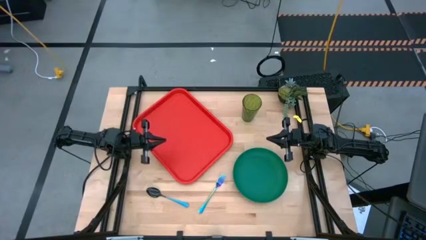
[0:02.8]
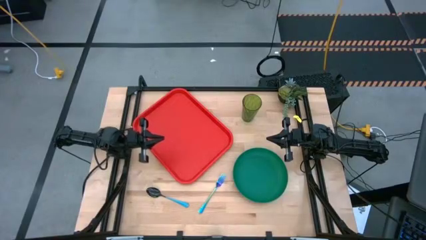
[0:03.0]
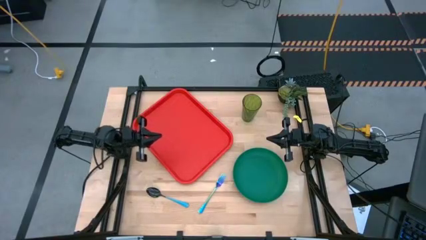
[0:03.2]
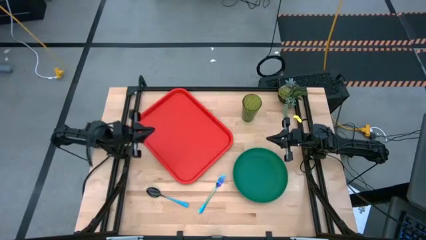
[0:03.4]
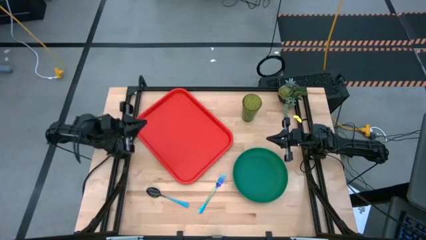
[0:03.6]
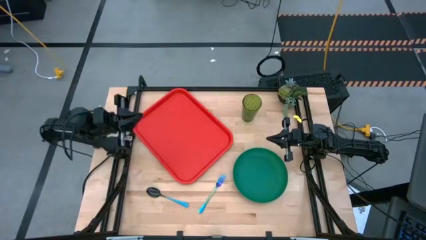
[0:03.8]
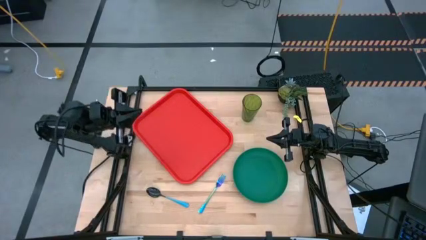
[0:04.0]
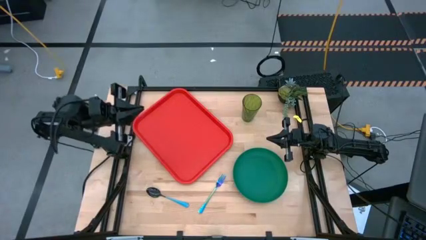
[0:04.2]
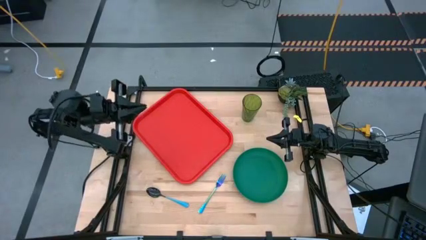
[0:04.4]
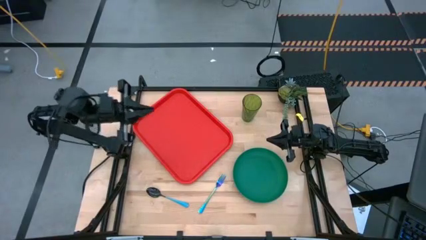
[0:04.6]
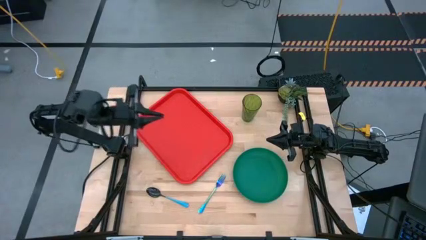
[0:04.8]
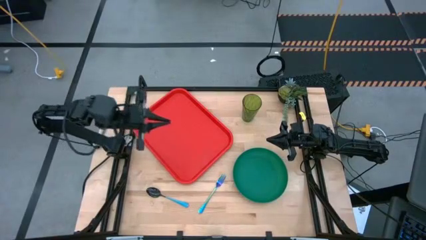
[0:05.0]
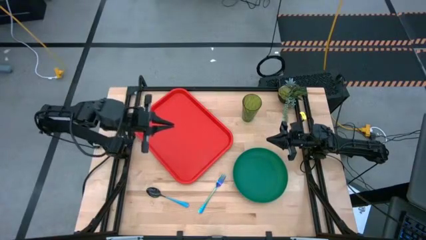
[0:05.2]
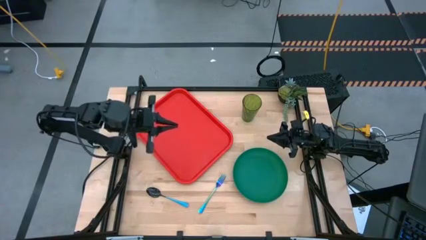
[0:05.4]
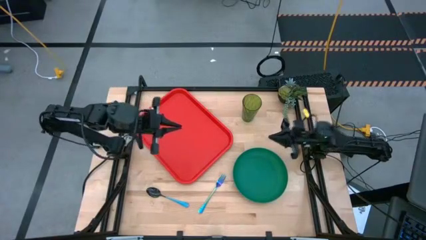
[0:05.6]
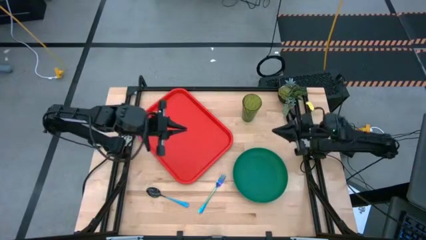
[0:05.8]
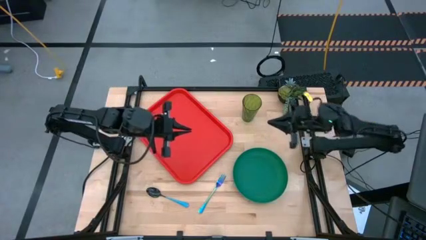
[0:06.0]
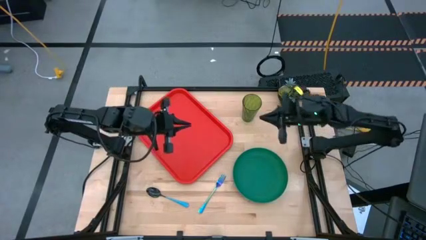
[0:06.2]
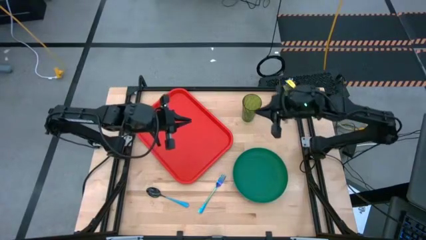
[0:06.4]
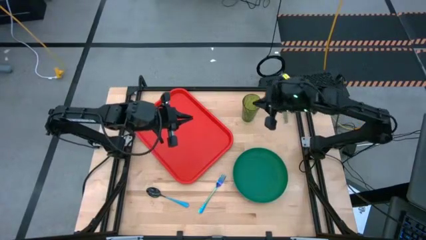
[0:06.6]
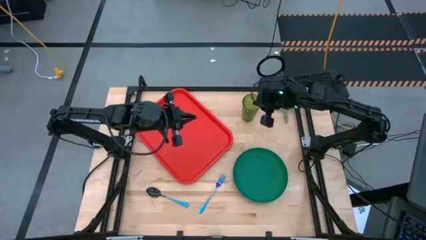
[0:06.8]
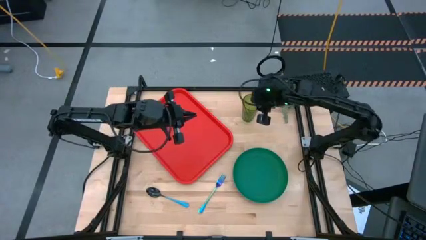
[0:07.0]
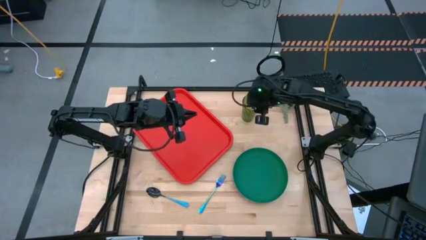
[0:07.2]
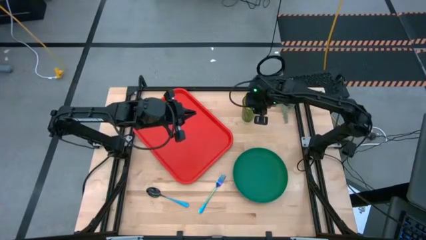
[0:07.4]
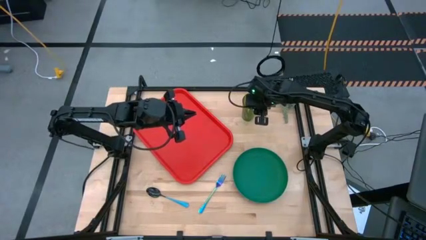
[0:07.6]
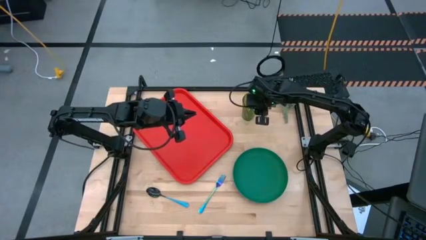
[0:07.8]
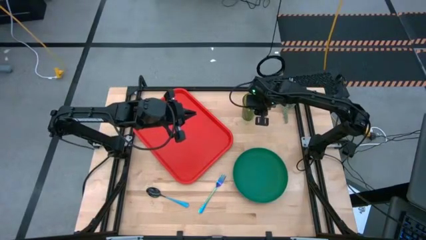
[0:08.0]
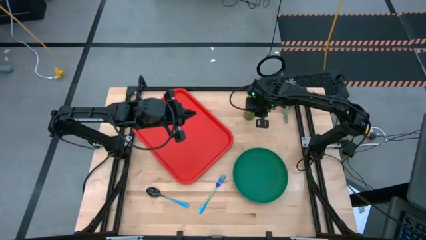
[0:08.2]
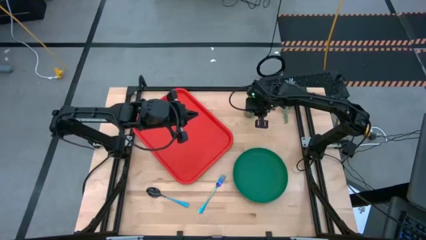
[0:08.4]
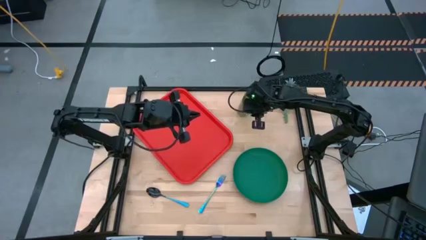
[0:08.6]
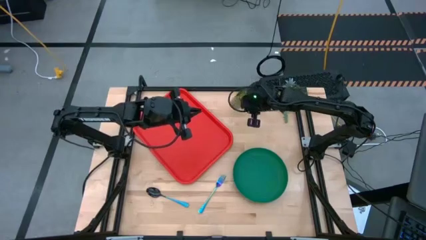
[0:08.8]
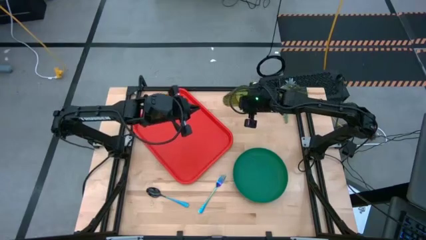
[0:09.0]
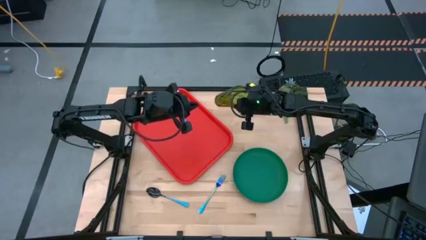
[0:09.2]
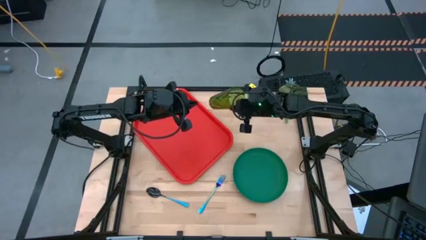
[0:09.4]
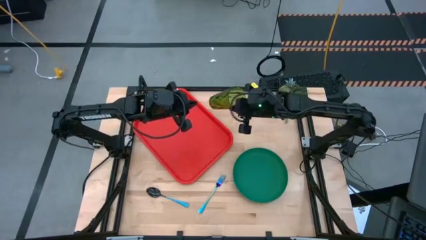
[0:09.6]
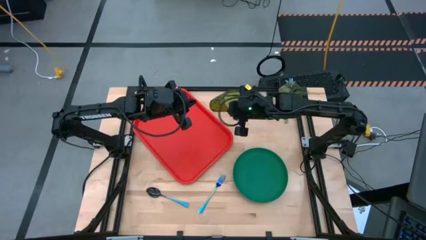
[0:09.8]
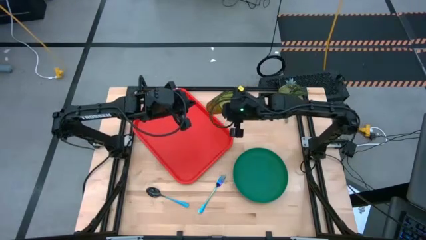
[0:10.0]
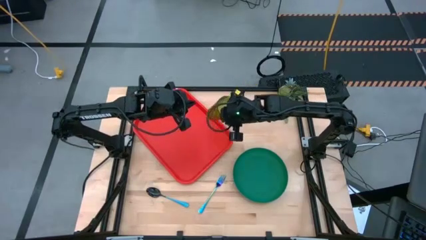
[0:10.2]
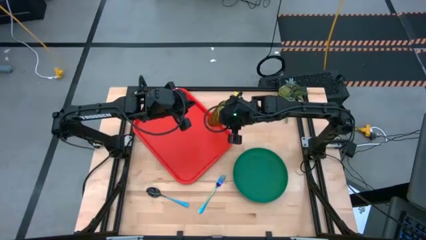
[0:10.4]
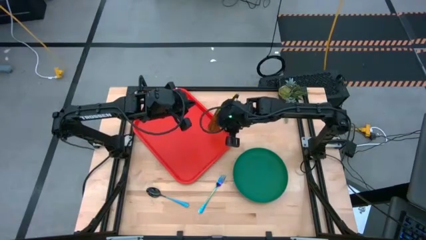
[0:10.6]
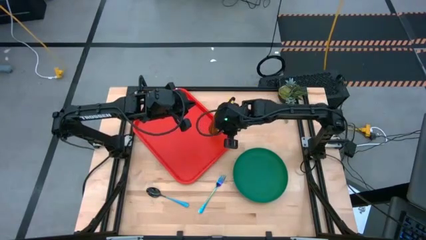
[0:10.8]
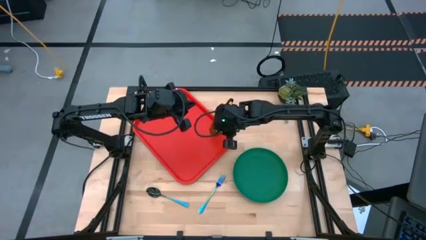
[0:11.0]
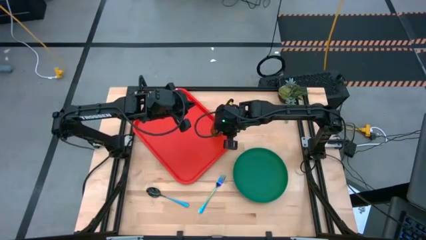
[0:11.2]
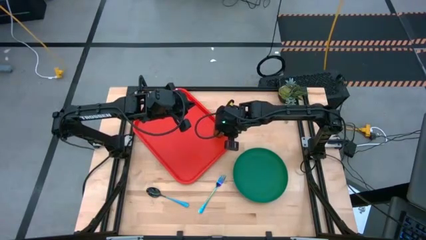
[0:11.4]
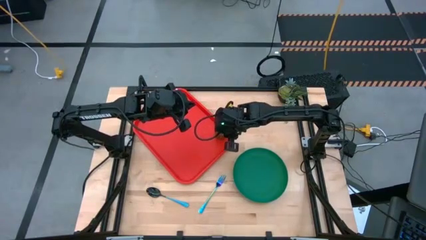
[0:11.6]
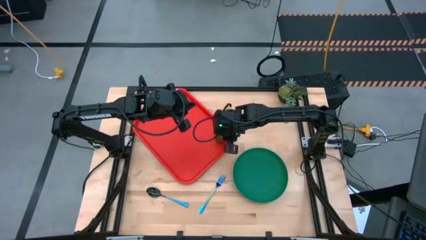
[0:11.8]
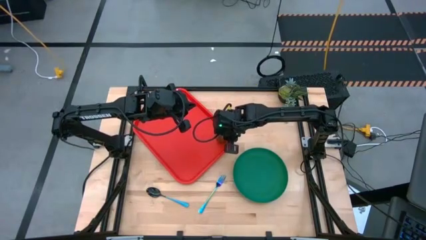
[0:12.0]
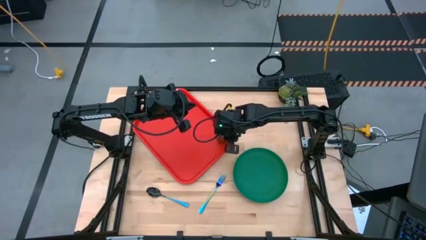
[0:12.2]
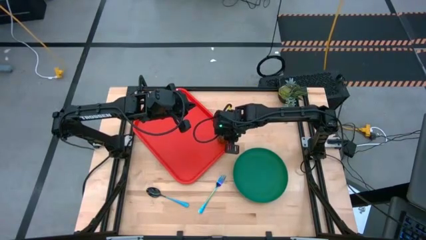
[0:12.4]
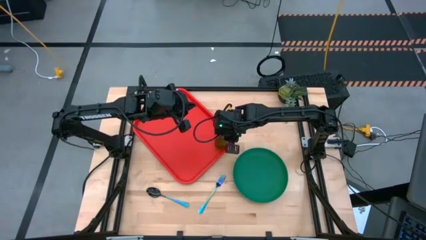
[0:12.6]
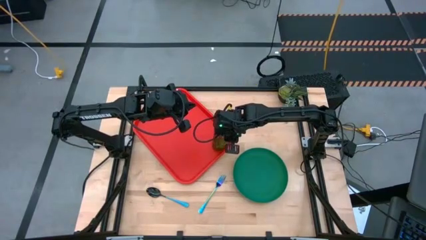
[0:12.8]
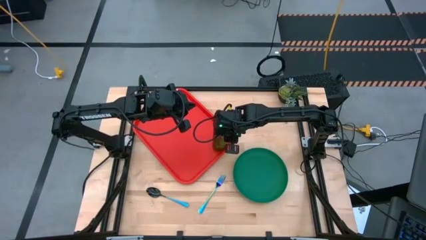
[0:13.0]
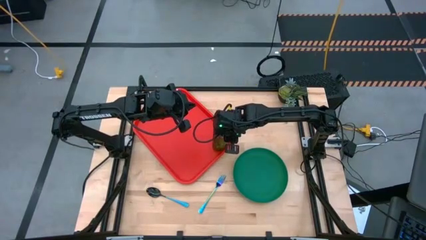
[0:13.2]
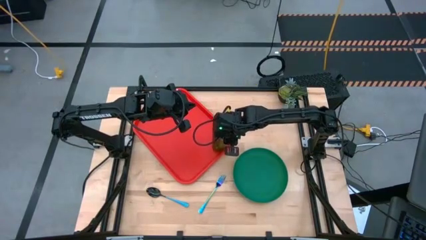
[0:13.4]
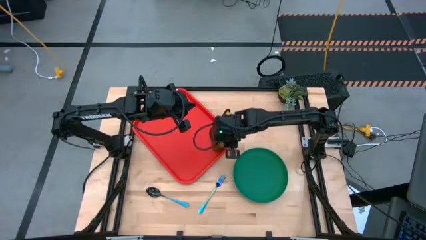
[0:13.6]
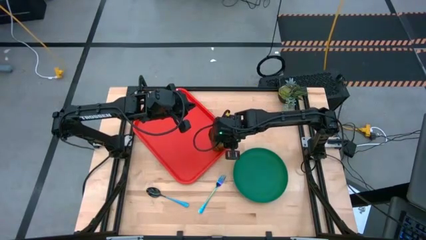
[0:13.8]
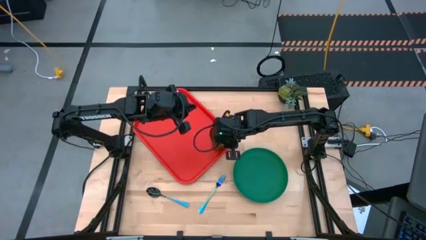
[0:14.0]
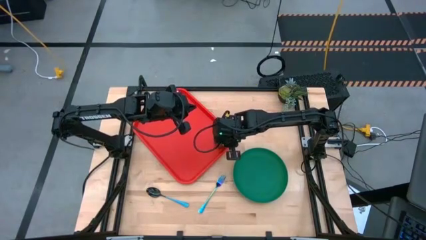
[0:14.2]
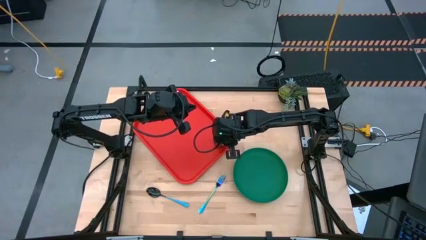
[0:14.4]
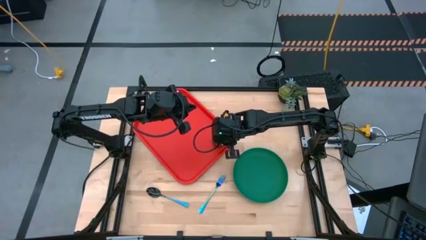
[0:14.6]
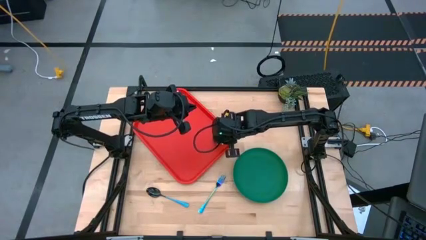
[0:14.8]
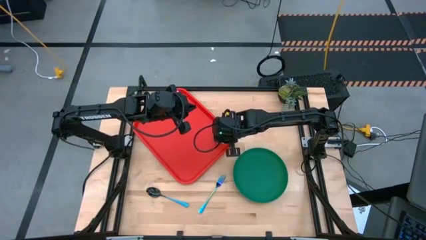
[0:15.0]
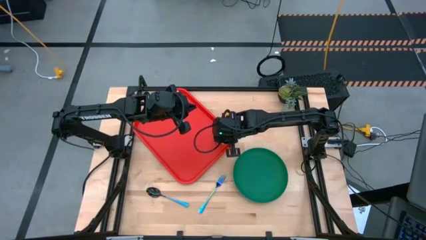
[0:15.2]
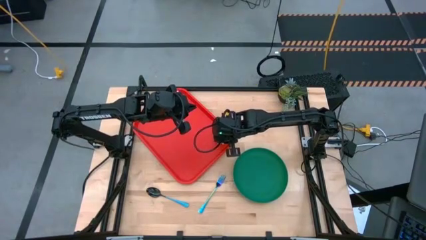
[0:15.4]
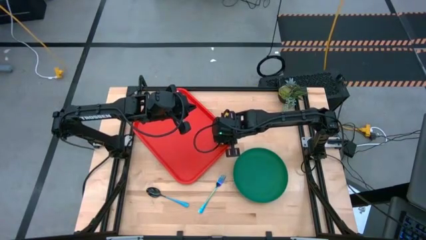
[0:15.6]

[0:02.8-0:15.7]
Task: Pick and place plate/cup/fork/spoon on tray
Put the green cup on the red serving tray
